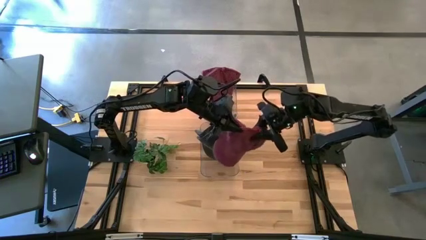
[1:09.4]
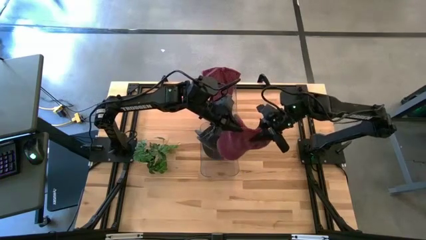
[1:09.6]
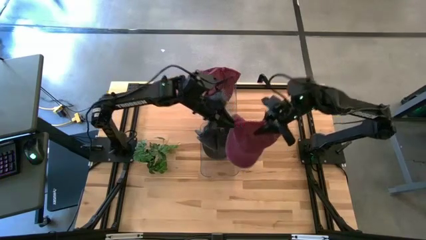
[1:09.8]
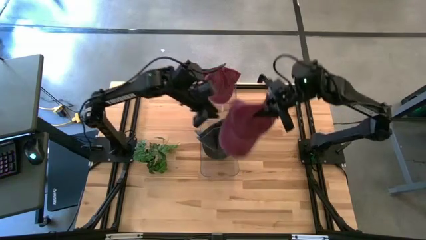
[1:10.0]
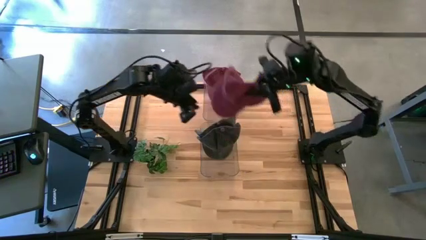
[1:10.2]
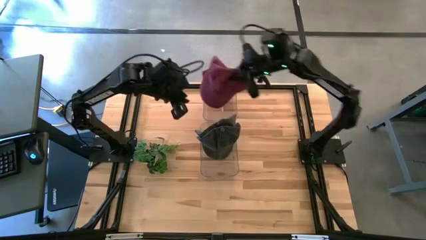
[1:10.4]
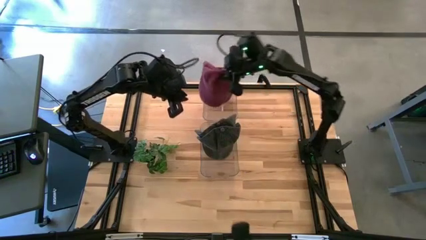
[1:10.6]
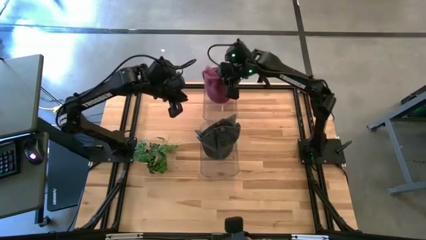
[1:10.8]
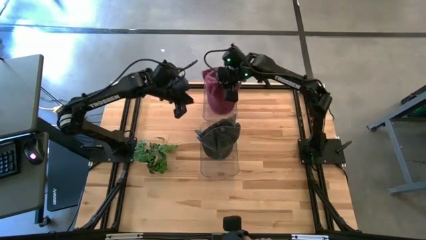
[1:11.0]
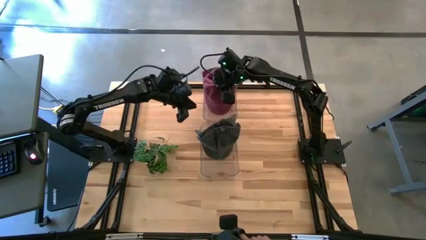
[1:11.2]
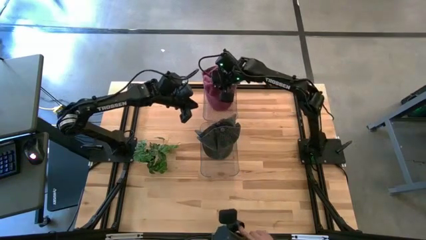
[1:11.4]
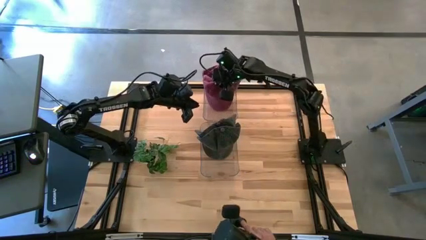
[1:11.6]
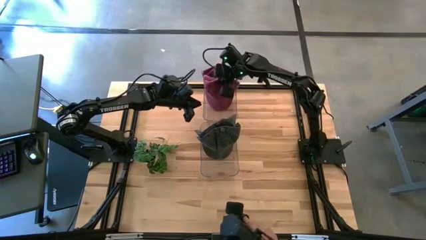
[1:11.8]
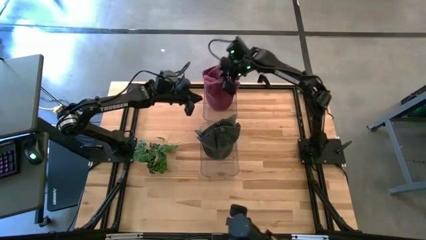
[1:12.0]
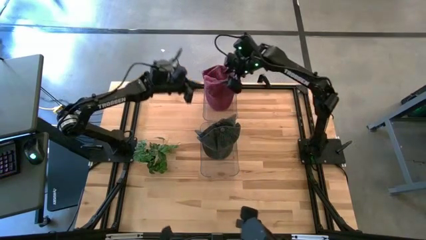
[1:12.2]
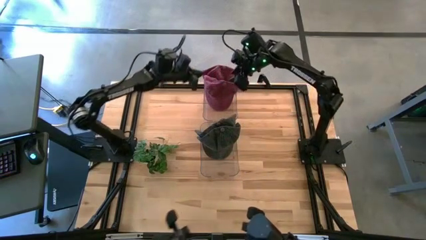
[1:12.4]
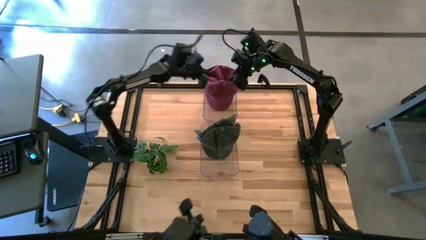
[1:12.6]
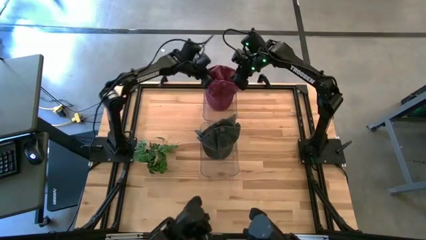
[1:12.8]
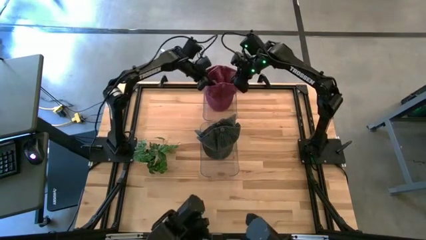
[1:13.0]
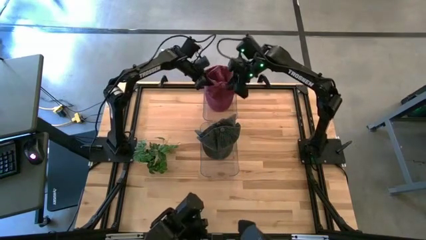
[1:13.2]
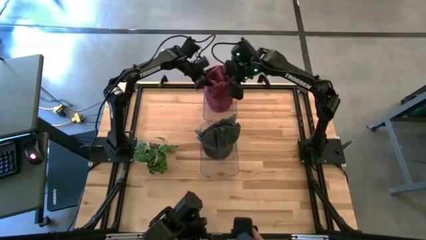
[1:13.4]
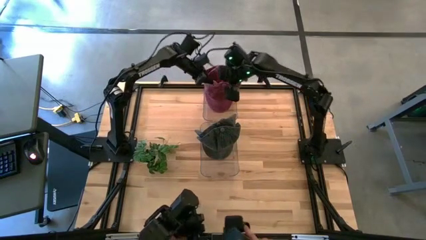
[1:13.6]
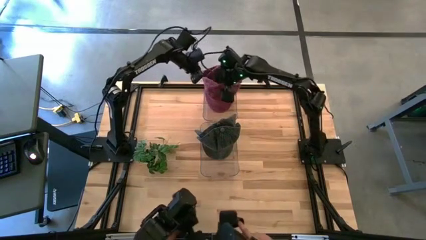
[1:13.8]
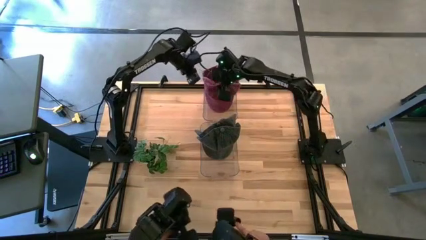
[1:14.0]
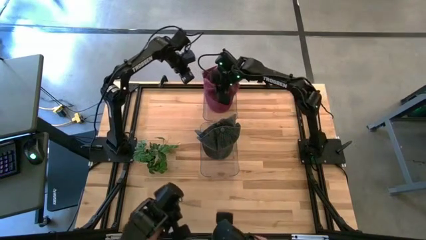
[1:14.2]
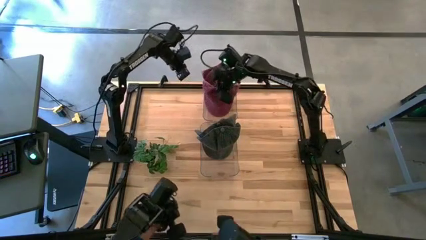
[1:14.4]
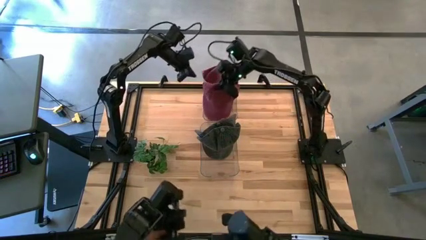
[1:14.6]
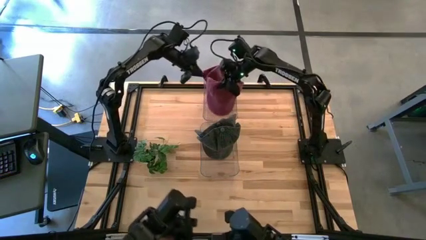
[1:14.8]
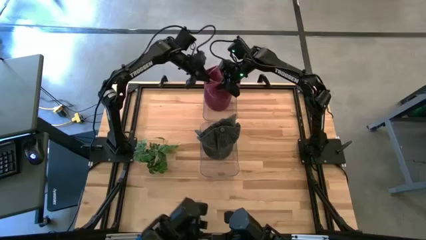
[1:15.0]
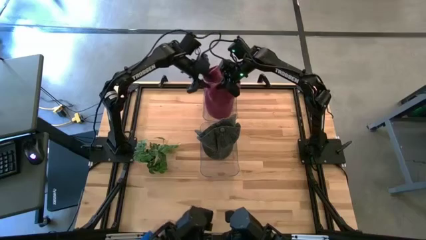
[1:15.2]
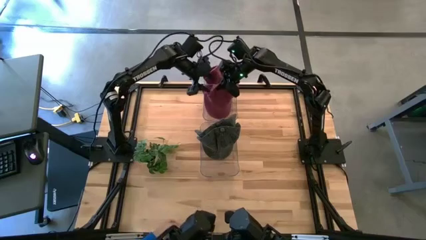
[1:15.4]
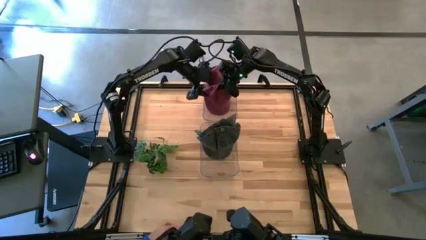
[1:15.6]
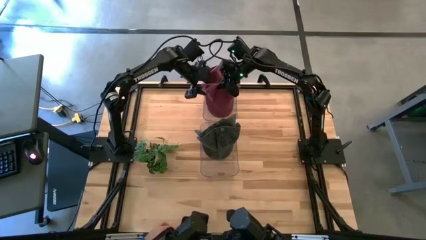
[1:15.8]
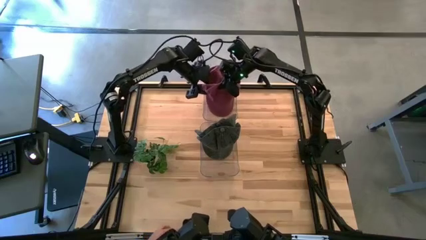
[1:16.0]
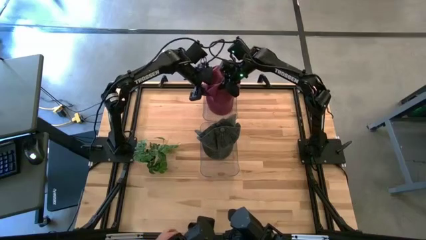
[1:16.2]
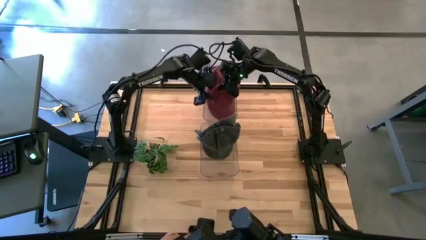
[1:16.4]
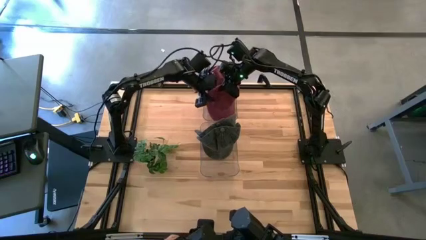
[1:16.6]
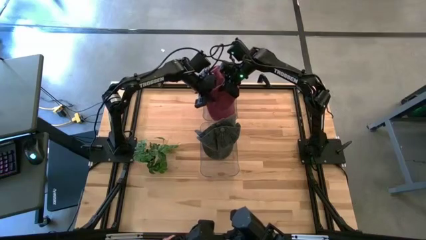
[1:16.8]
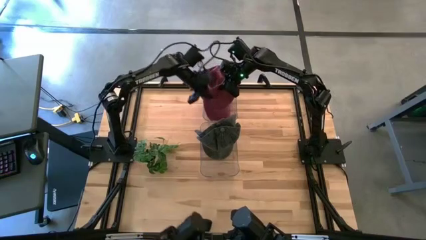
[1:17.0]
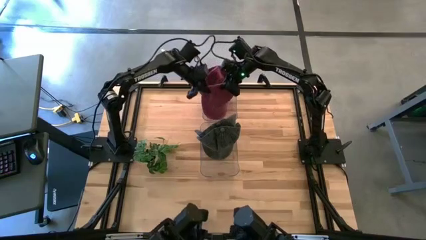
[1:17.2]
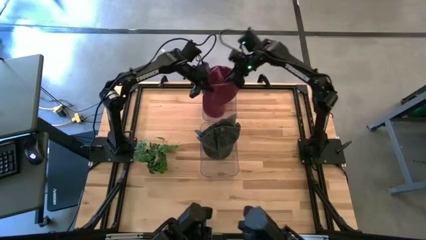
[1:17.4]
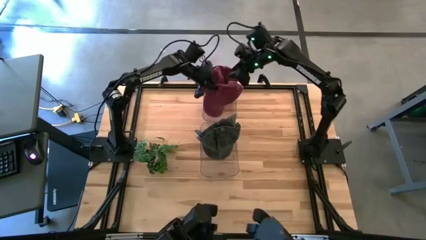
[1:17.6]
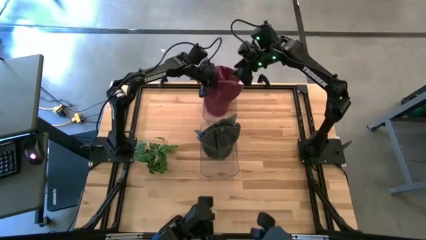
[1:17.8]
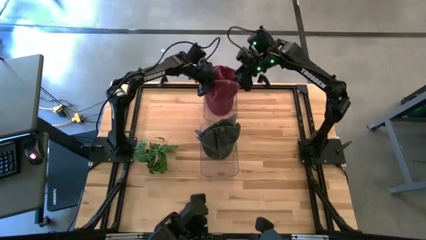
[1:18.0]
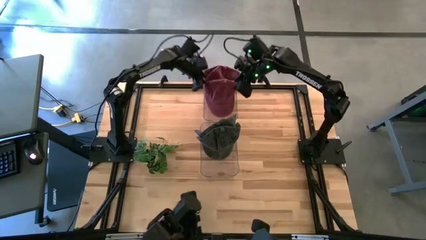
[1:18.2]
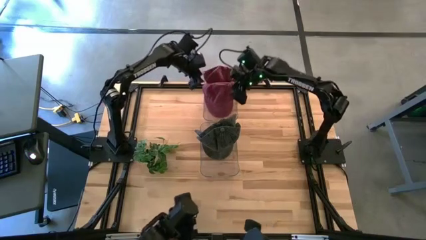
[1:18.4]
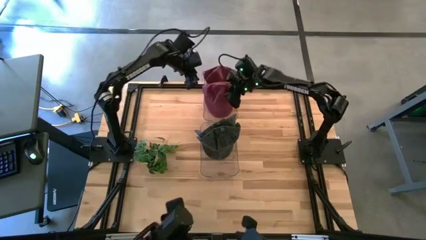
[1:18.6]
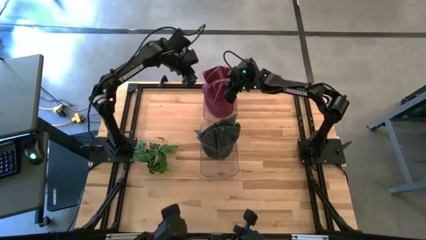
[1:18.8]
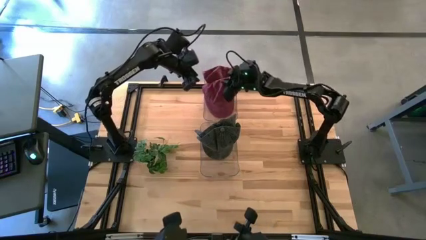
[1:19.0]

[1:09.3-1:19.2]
Task: Pick & Place hat
Put the red cap into the top transparent bin

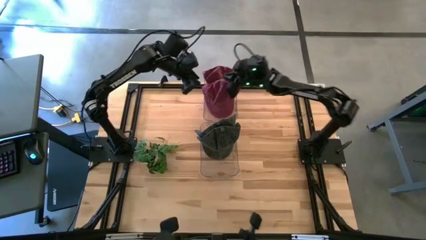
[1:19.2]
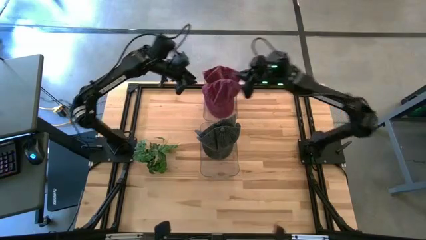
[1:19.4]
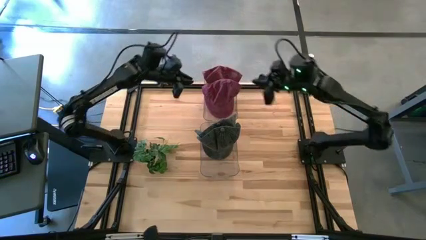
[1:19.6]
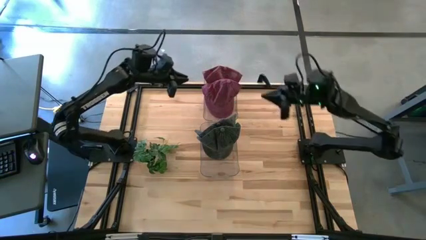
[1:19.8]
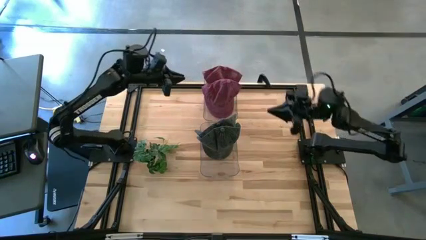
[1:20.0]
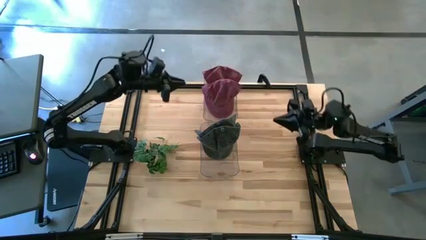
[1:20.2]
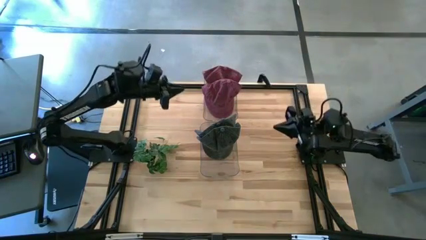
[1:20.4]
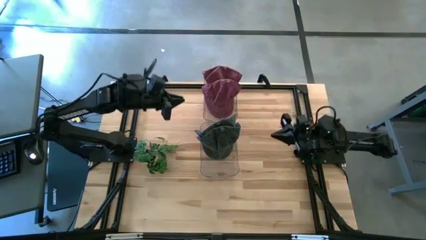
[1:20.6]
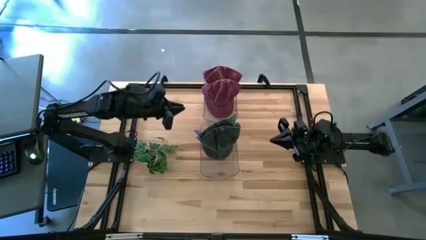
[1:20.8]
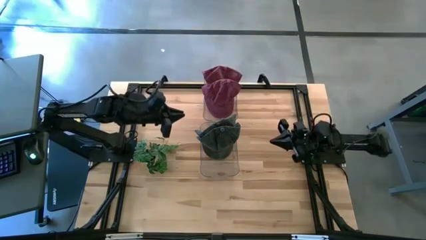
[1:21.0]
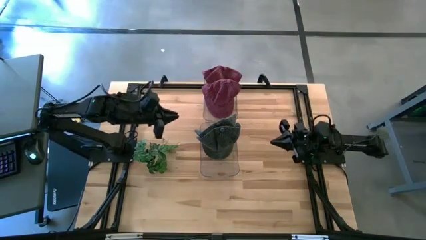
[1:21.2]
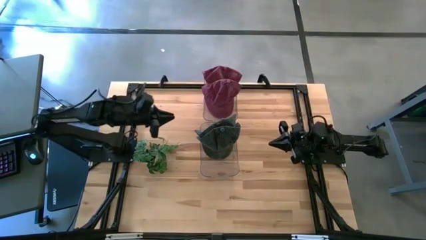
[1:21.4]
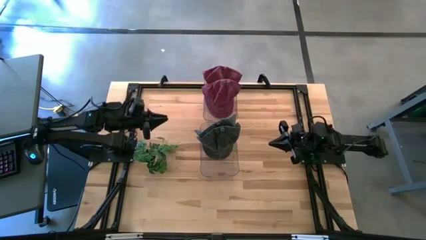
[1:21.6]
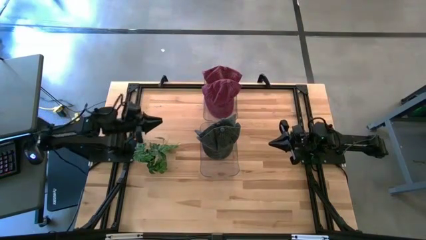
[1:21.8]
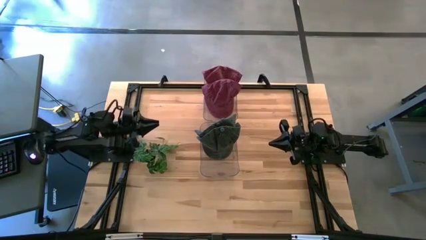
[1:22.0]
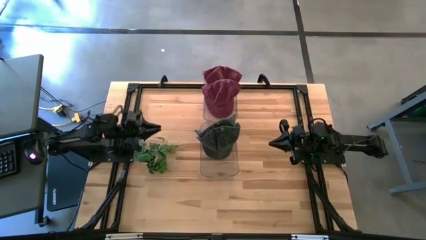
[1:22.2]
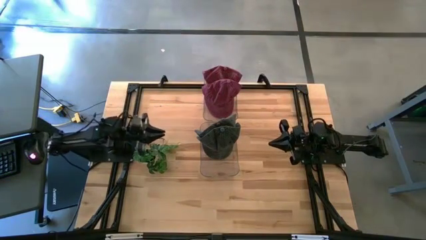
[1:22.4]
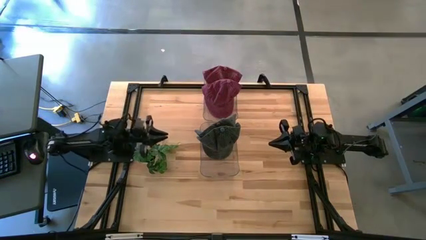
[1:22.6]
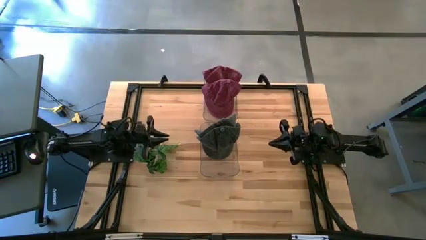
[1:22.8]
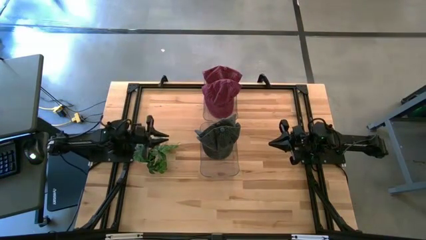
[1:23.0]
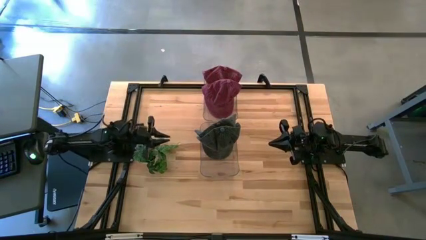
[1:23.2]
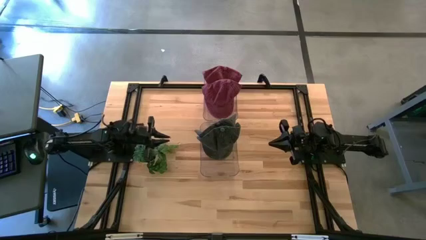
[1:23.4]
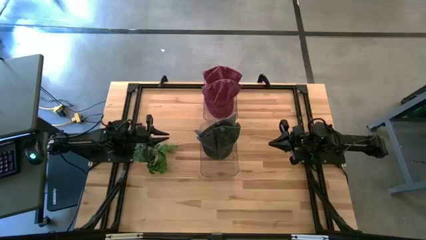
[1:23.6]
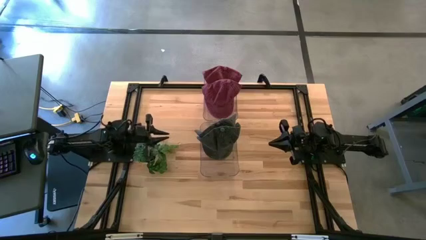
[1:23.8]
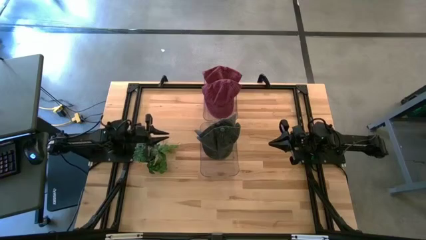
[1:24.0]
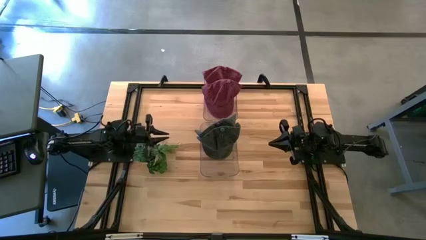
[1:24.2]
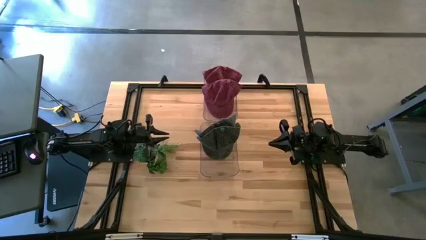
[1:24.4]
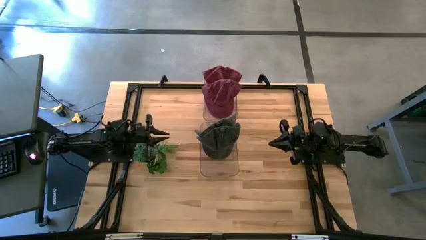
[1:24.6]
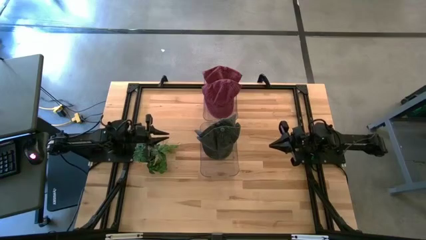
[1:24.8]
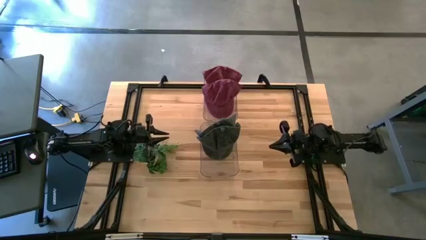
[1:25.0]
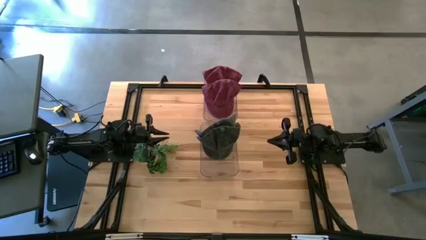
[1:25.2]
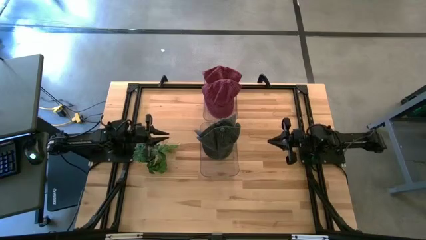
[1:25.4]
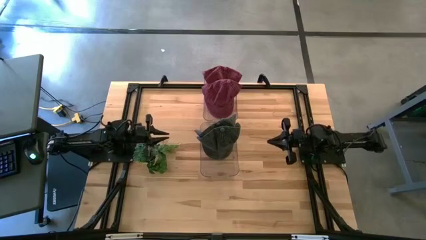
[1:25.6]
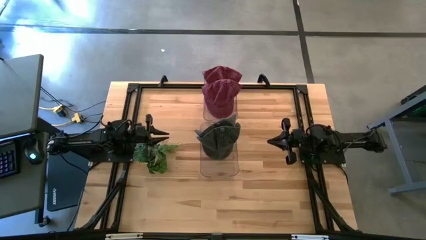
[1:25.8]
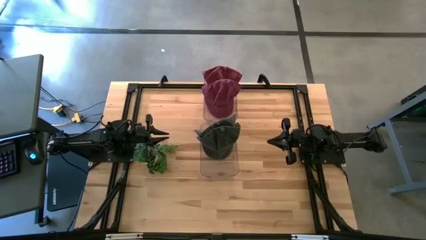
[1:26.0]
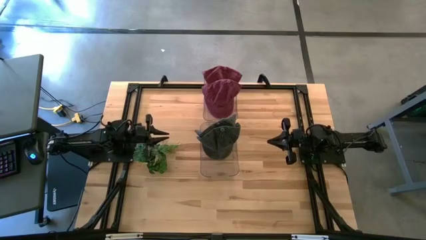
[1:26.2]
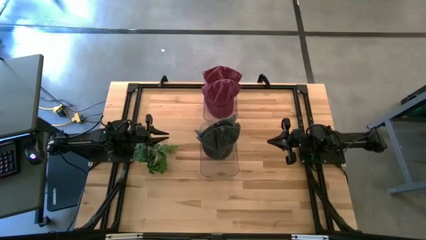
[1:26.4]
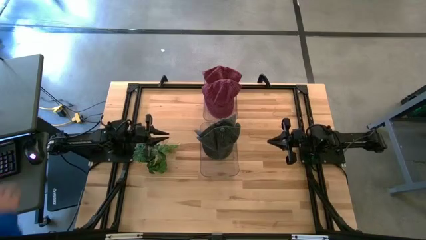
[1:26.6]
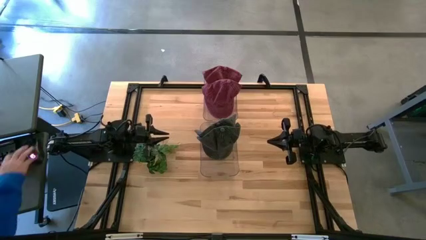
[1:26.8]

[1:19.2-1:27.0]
Return to Home Position
